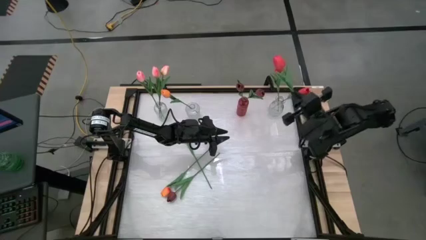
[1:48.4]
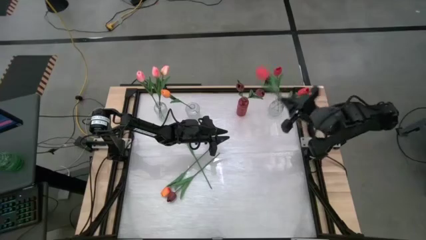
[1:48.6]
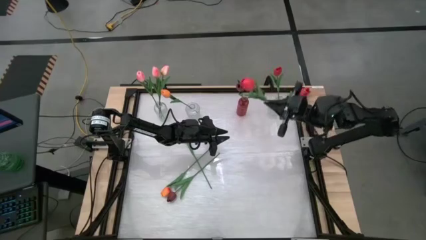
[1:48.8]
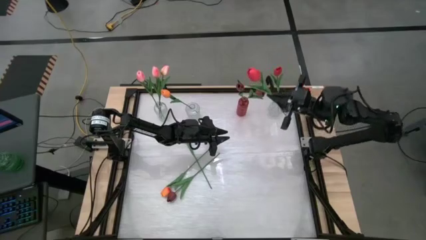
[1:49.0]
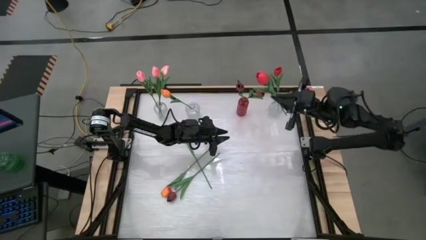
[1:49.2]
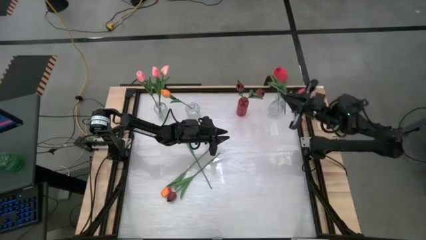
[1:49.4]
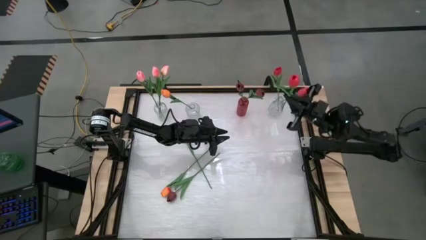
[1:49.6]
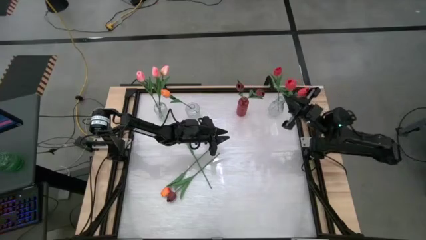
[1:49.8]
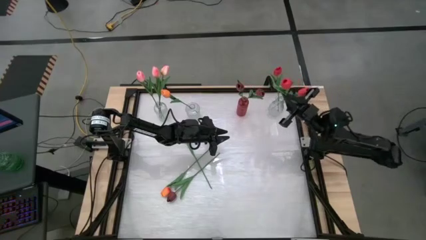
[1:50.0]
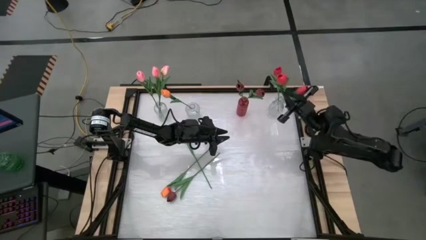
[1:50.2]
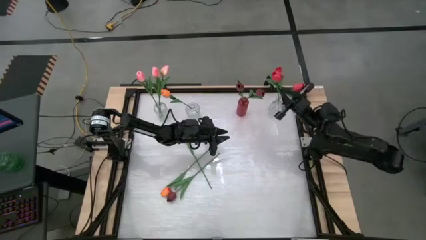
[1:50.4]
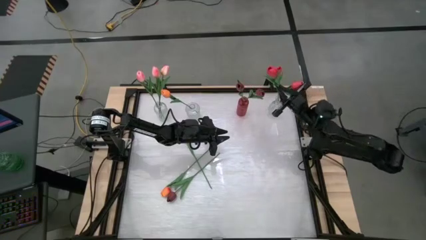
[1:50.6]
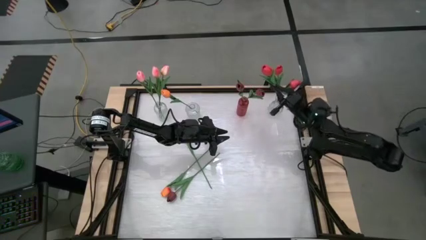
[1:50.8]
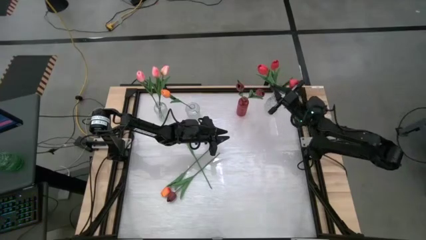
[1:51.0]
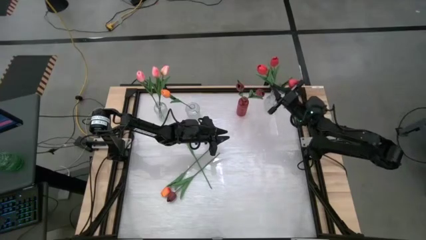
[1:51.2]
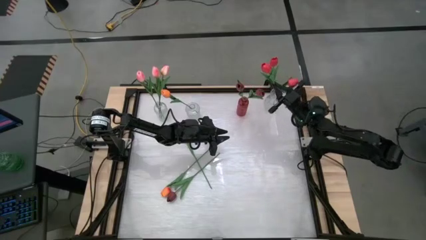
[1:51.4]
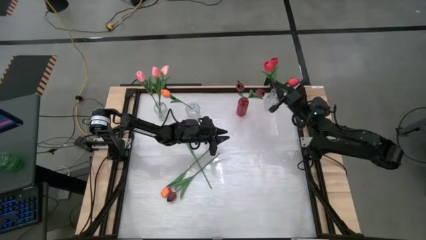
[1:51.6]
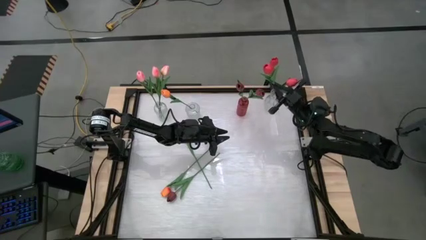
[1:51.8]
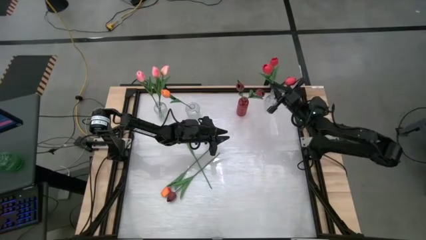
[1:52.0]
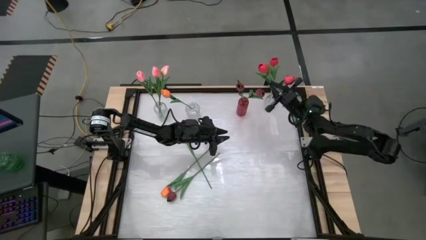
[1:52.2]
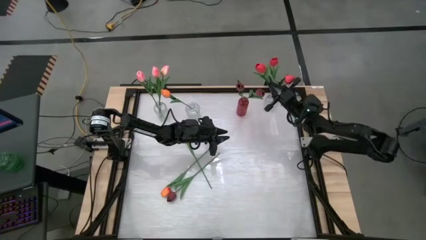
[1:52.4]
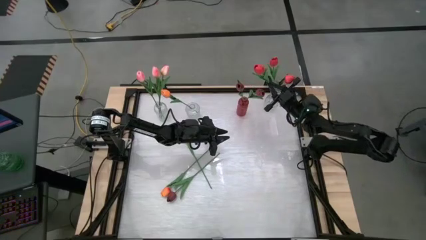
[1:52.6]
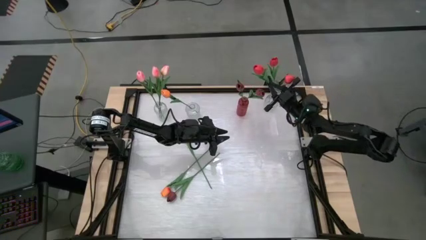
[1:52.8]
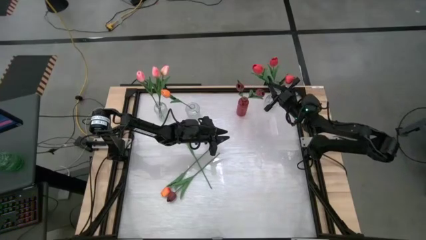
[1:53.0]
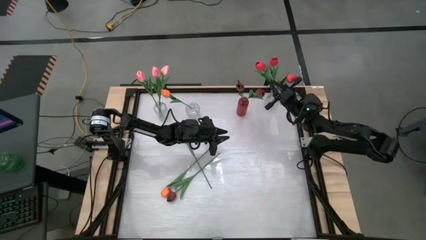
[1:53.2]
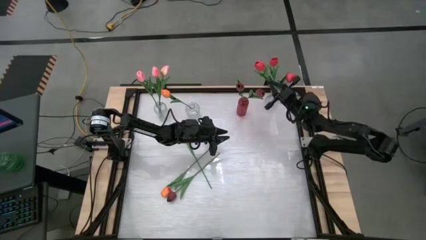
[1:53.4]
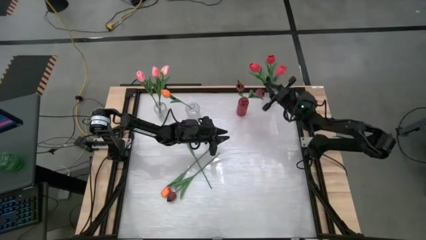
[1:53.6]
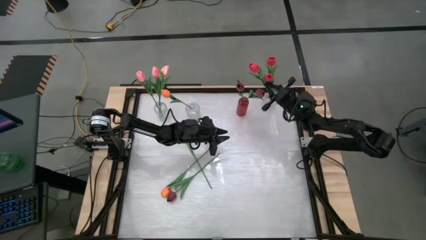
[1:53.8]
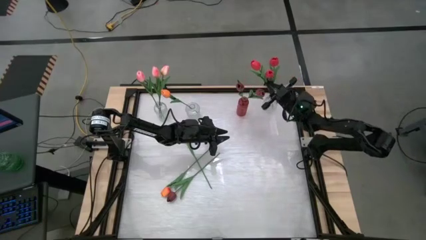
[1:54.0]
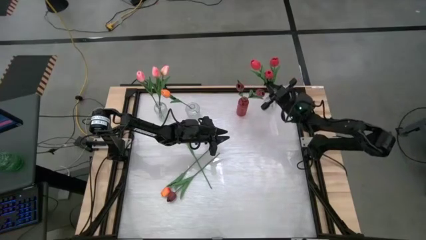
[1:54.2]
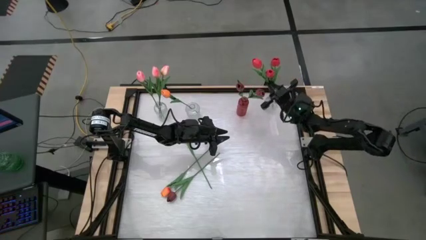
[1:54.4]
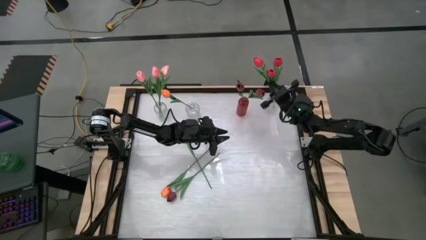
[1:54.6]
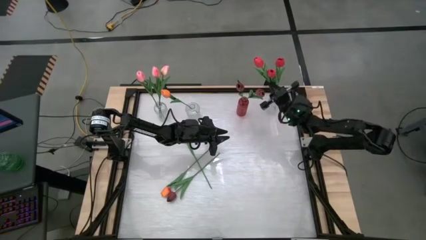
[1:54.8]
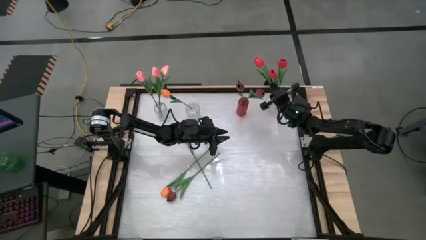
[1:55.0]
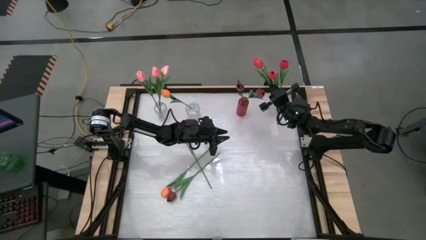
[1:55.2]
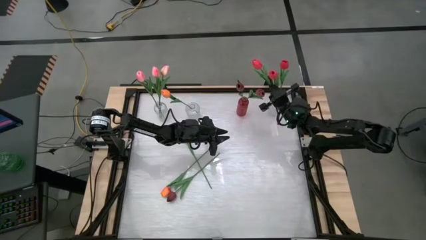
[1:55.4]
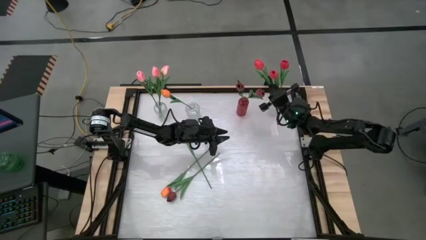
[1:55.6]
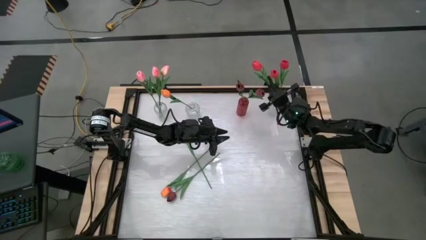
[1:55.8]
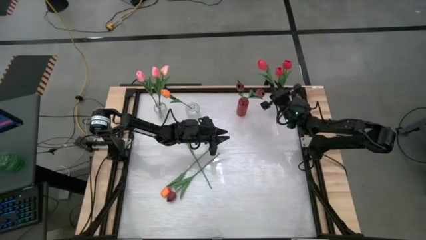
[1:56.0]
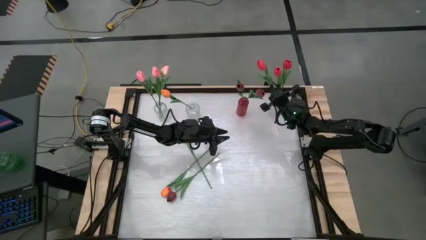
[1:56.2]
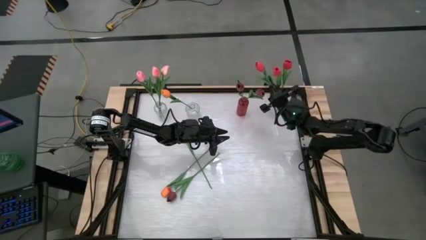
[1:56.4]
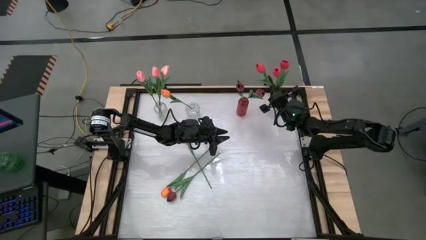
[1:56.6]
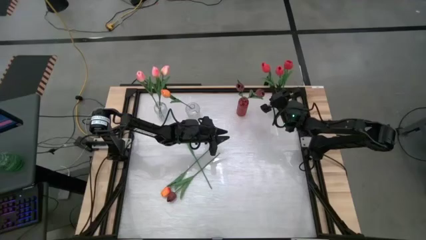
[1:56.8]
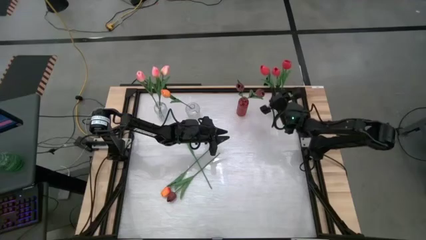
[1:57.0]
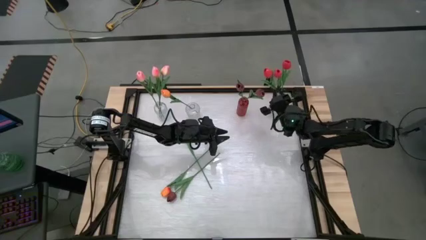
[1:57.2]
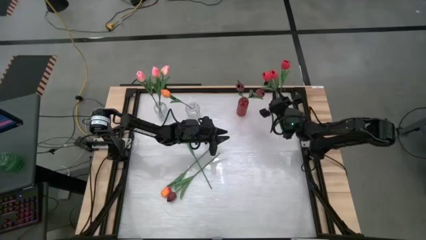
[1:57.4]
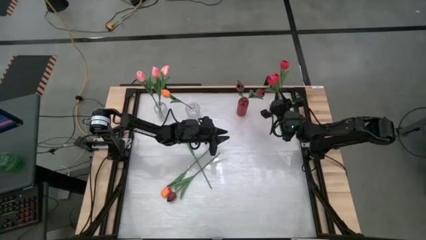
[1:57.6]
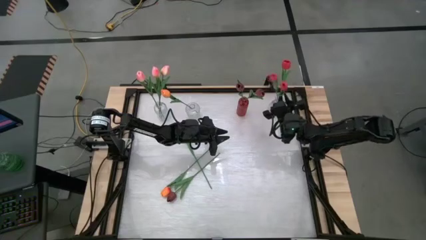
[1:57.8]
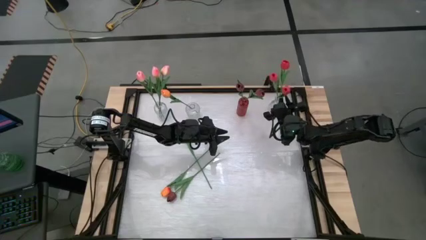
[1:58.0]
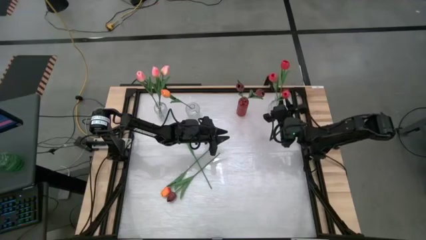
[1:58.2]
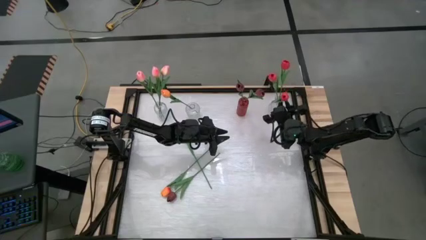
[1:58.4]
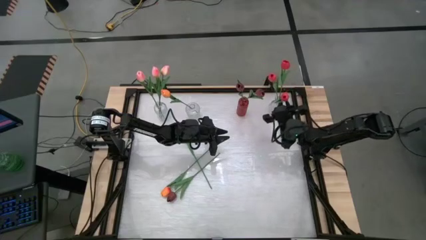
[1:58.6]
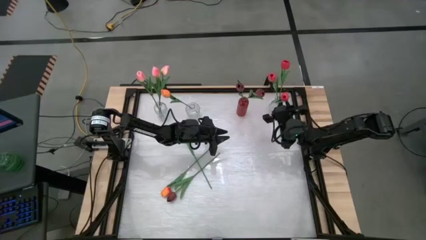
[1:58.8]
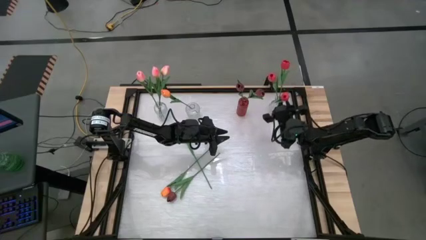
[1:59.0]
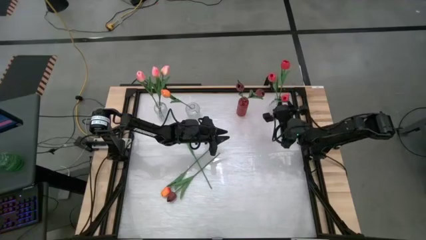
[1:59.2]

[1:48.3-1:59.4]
Task: Sort flowers into vase by color
Put the pink flower into the right transparent vase

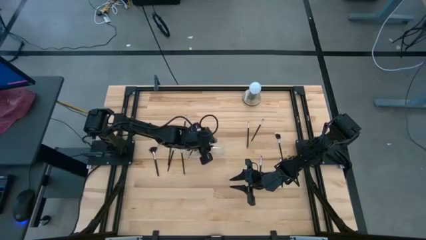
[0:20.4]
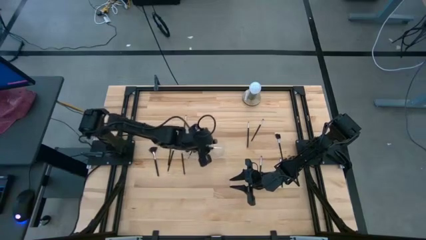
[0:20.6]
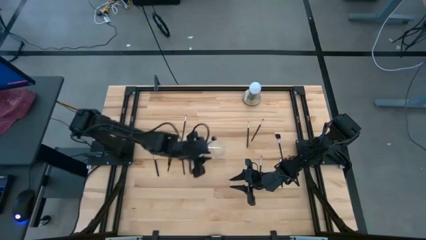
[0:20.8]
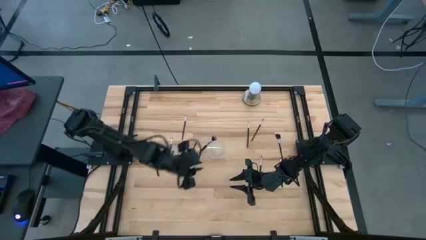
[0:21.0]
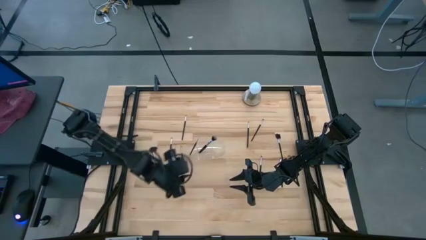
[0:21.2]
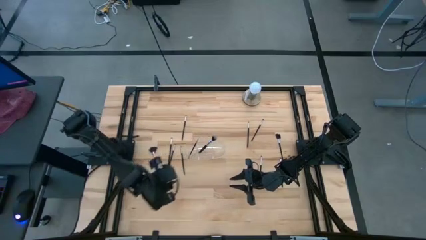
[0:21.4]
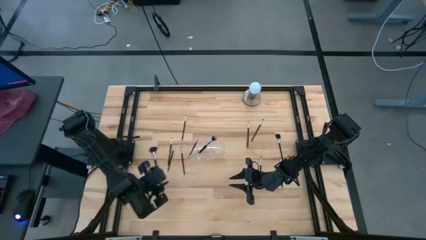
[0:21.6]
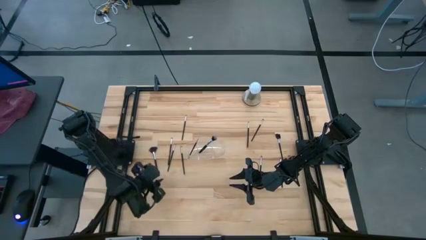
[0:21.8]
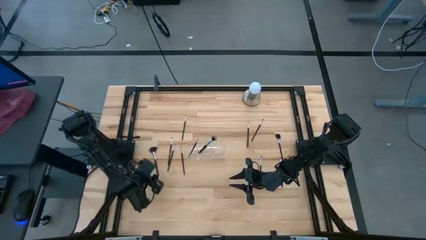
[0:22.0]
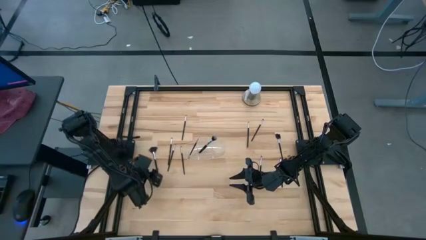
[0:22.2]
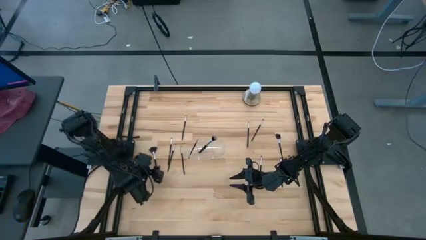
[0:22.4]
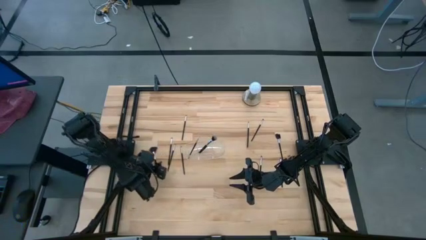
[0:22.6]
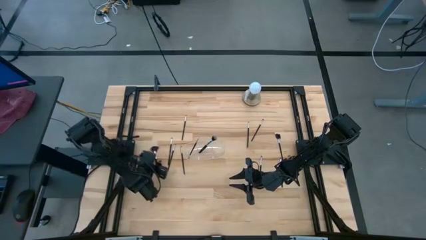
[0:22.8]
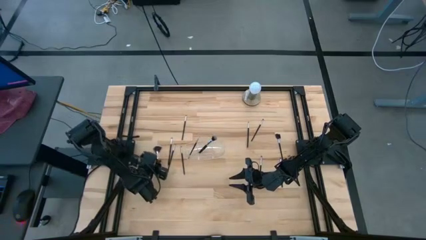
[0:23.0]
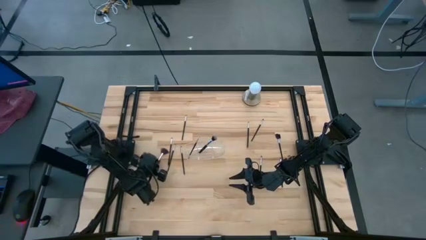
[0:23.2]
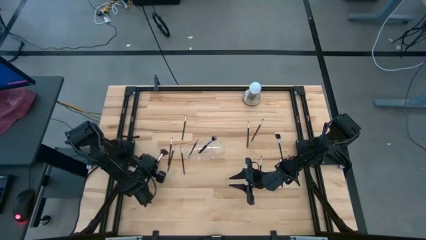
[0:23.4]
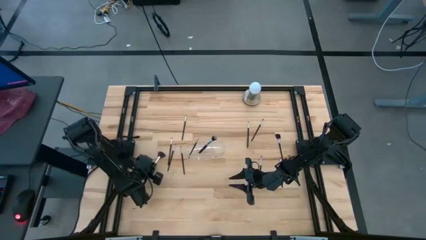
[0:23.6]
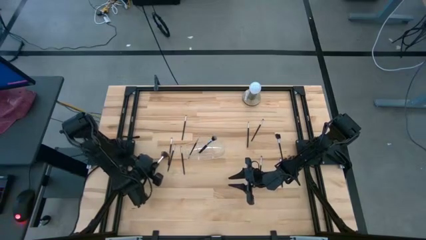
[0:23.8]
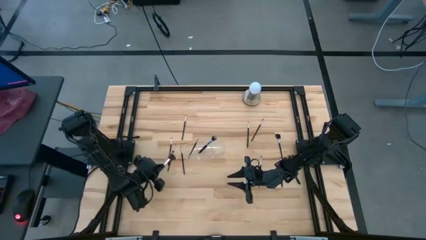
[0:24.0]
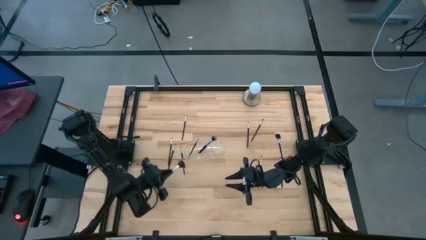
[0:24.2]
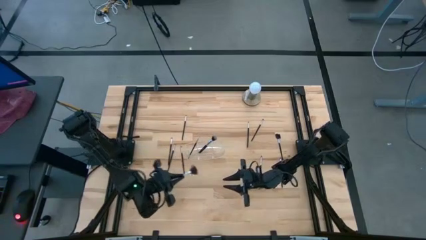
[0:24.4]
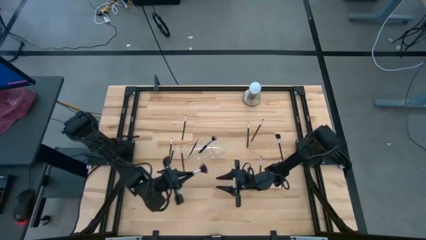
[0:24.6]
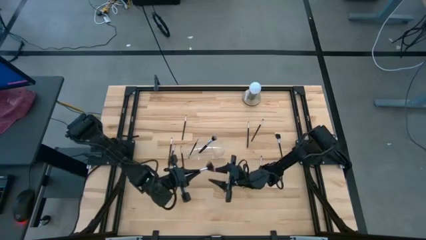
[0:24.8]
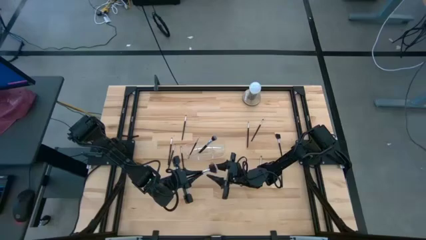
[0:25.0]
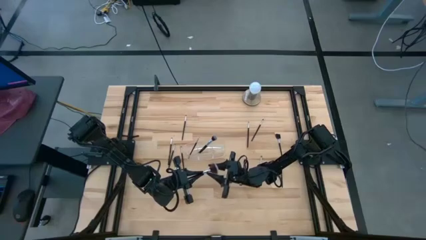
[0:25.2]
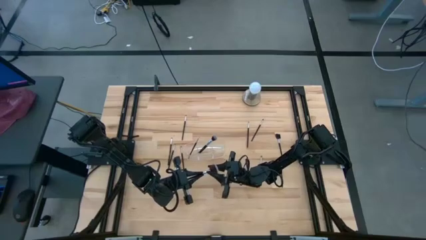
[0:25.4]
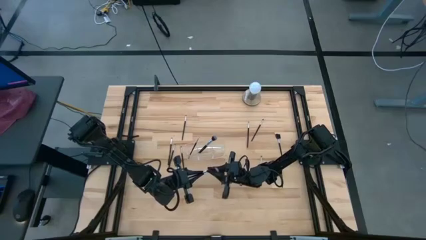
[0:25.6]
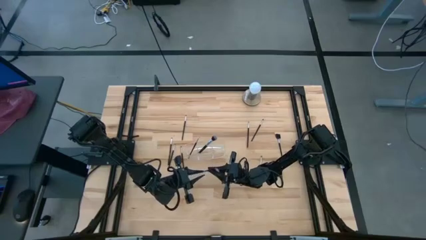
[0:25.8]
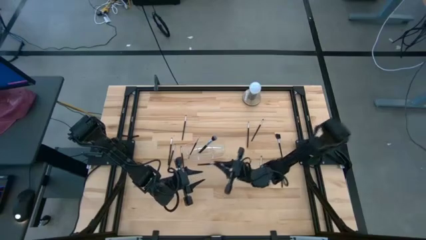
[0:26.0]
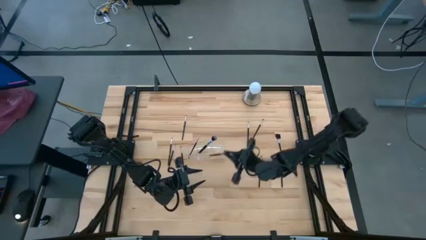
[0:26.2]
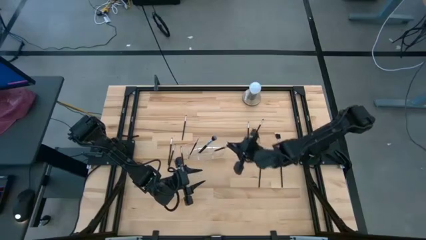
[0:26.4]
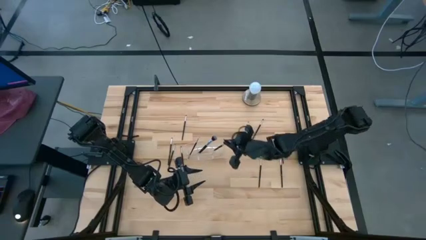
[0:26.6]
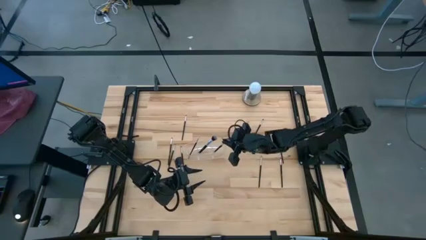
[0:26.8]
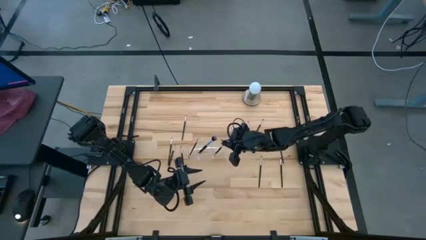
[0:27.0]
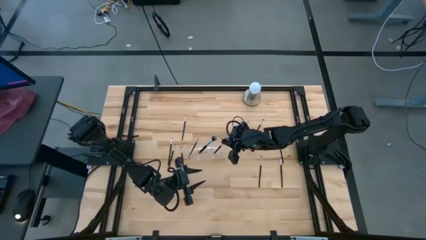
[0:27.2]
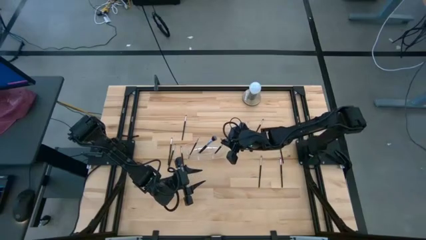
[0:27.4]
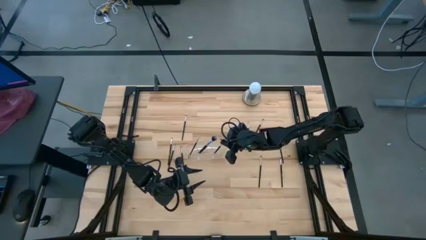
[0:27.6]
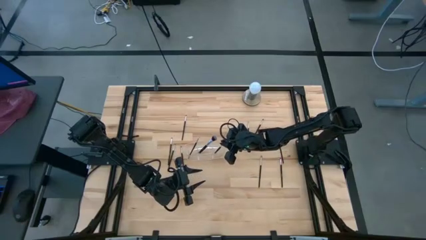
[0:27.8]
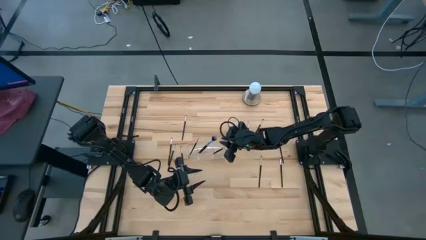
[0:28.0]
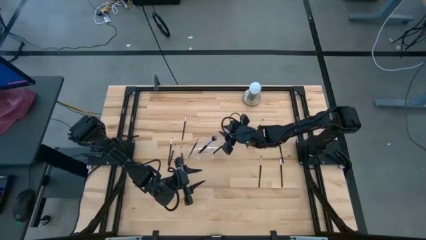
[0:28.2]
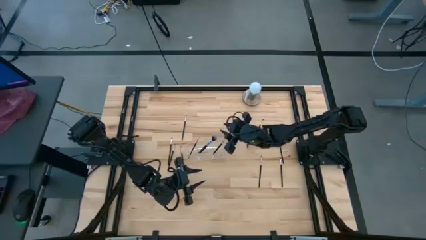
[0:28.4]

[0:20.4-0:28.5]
Task: Put items in baskets/containers
Put the highlighter brush into the transparent organizer
